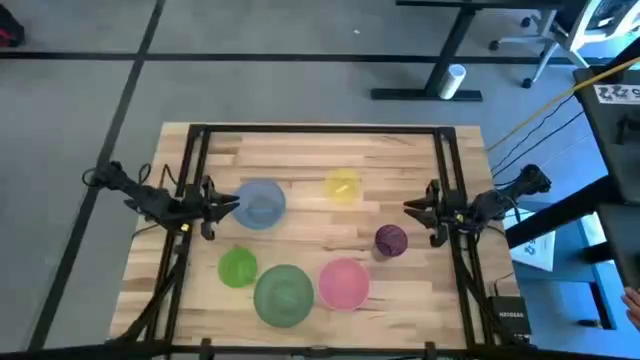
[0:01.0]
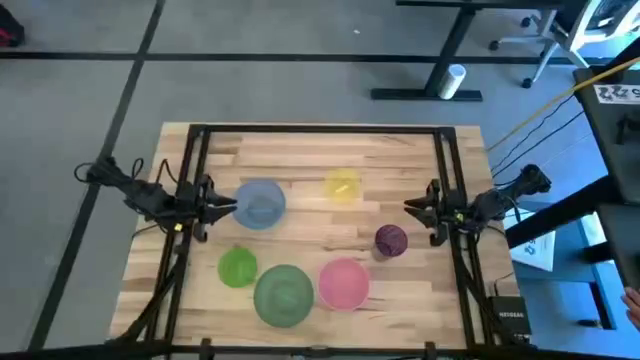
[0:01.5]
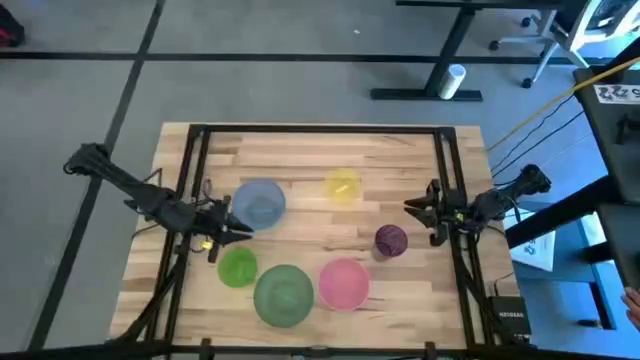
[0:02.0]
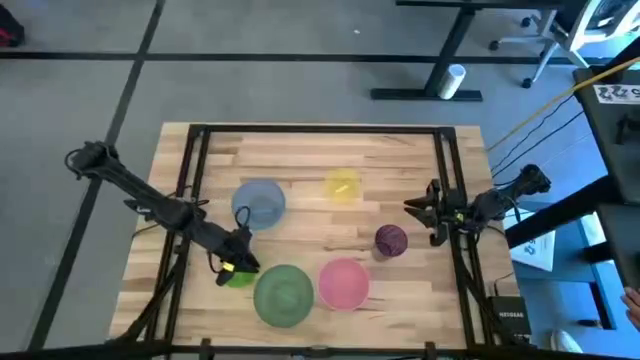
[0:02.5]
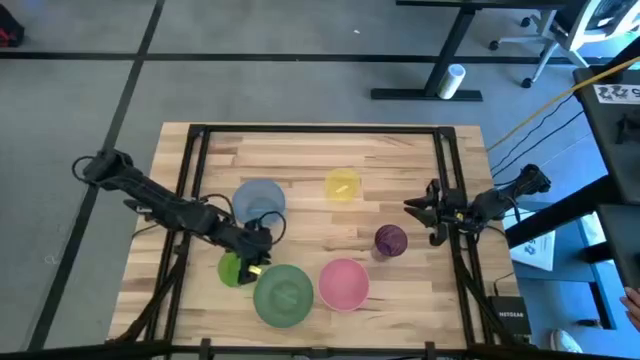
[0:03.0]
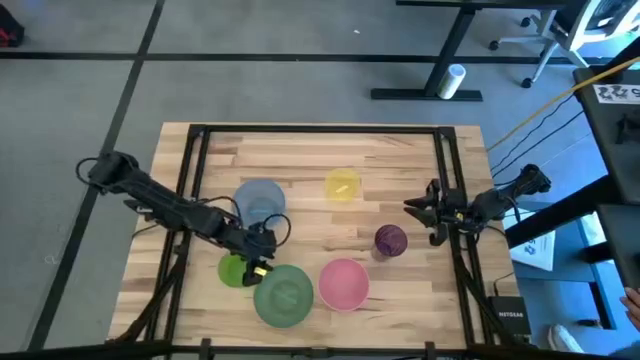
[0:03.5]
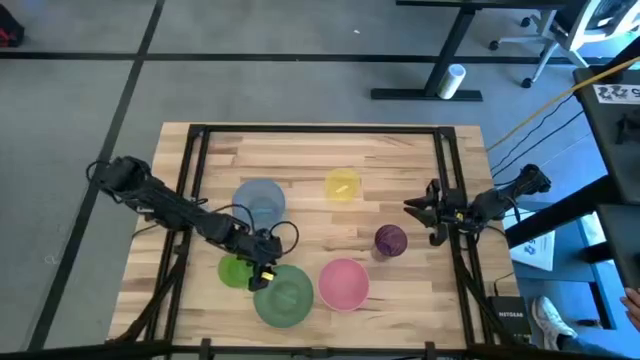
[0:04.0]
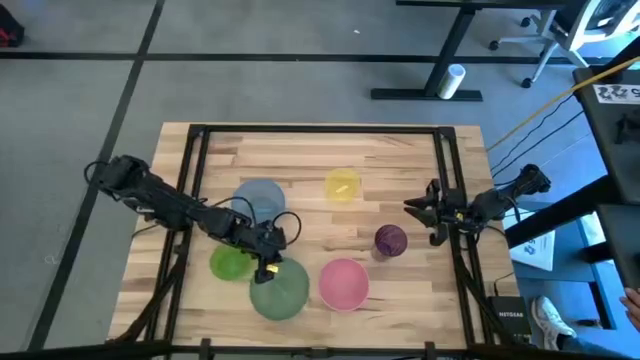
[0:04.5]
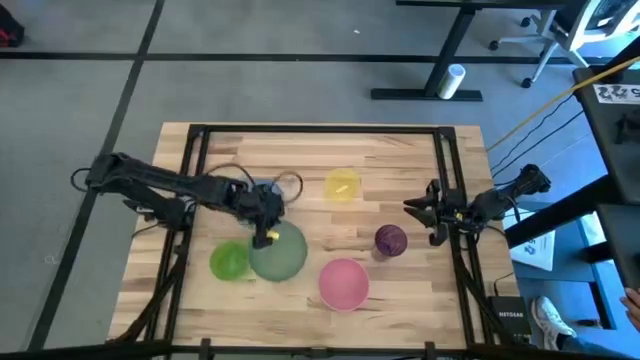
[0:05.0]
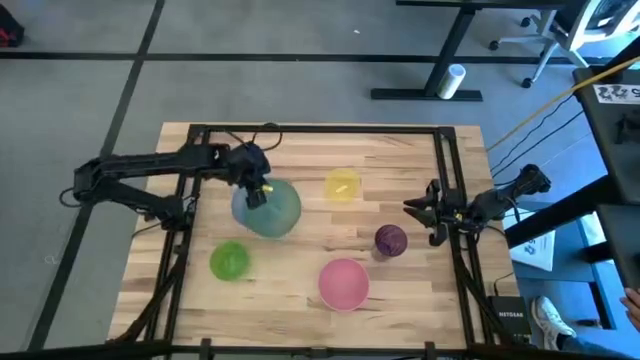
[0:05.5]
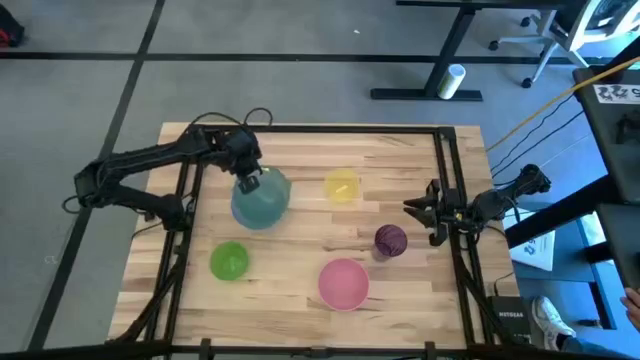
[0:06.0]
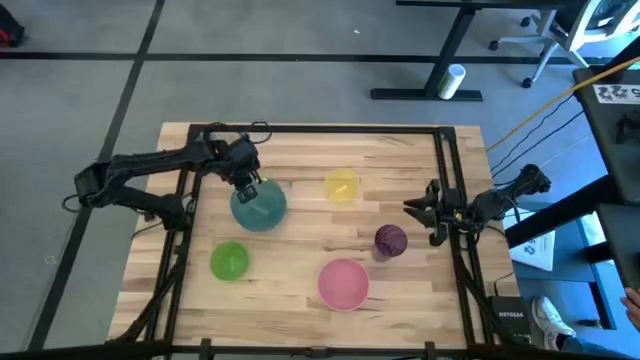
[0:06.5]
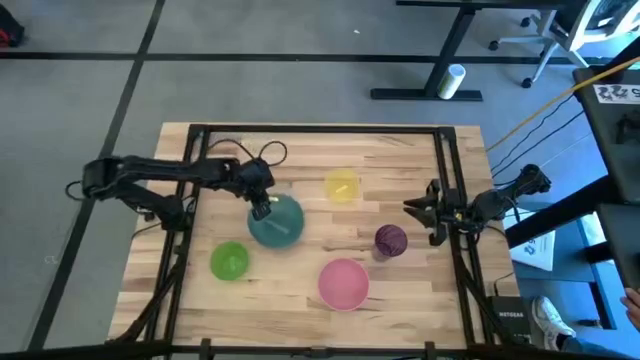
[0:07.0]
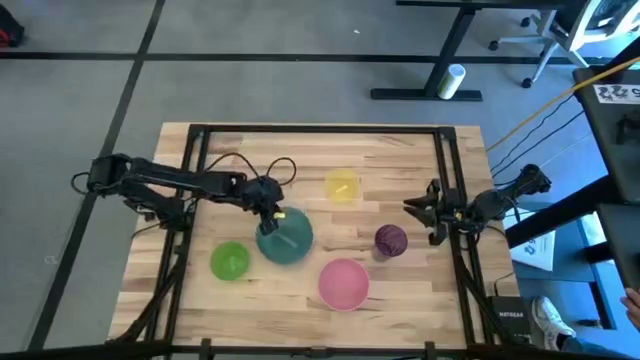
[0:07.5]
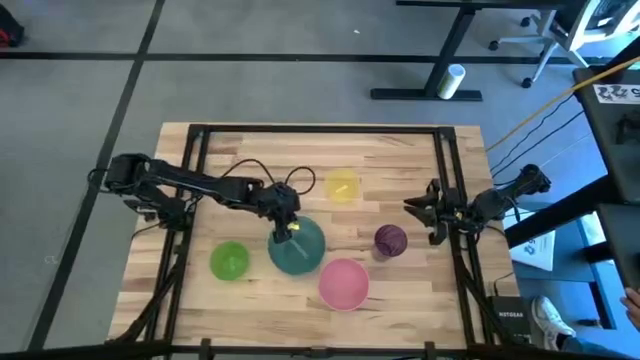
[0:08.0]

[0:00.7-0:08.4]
Stack the dark green bowl on top of the blue bowl

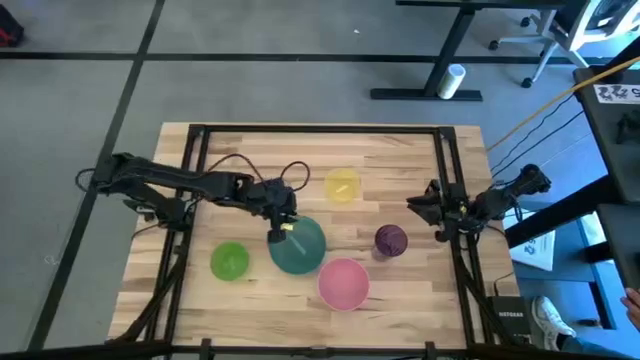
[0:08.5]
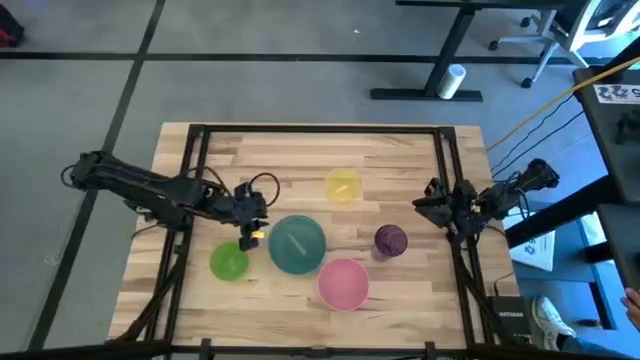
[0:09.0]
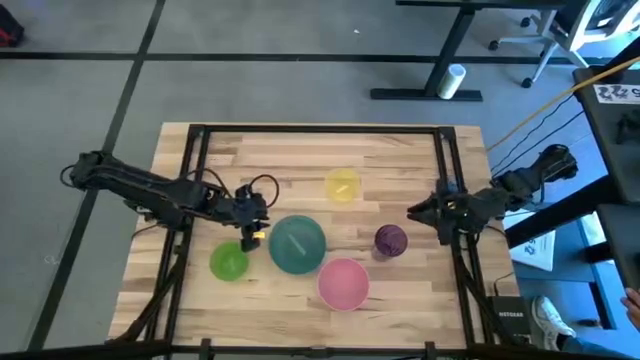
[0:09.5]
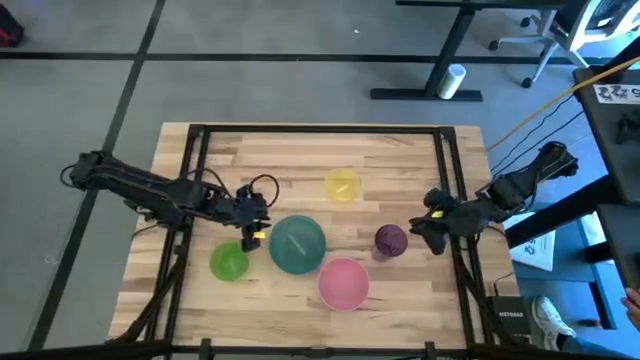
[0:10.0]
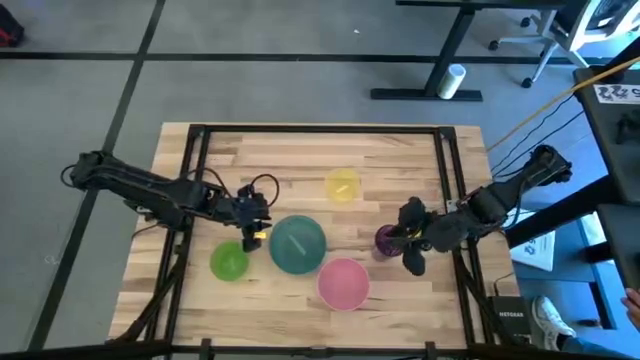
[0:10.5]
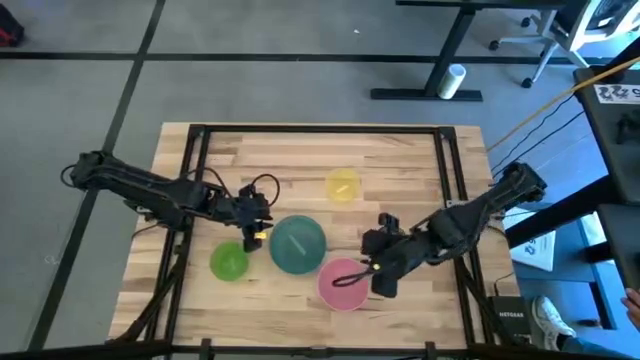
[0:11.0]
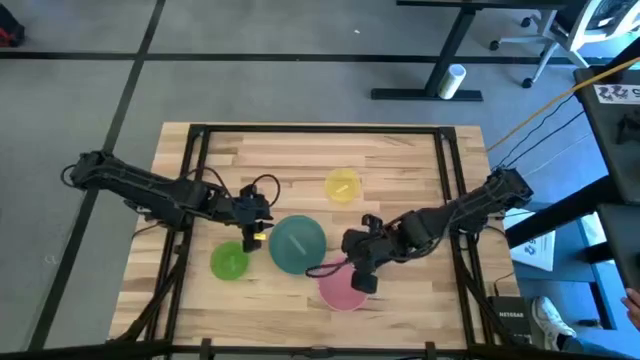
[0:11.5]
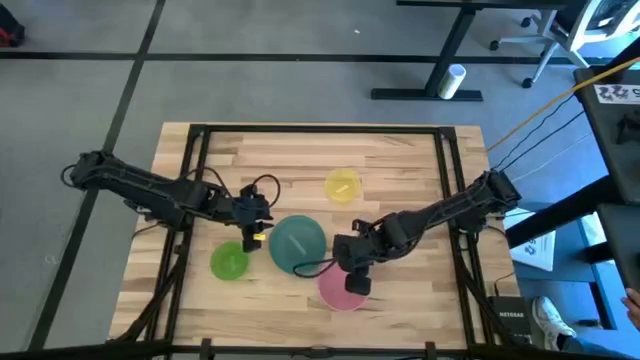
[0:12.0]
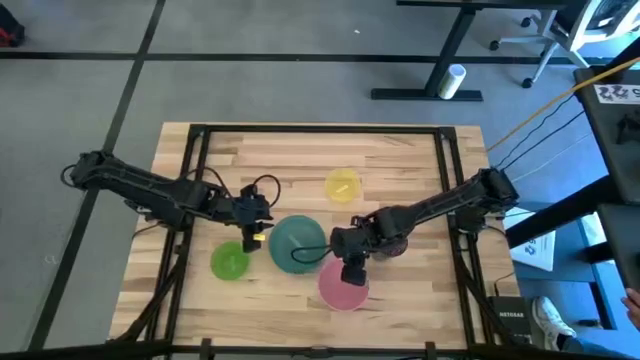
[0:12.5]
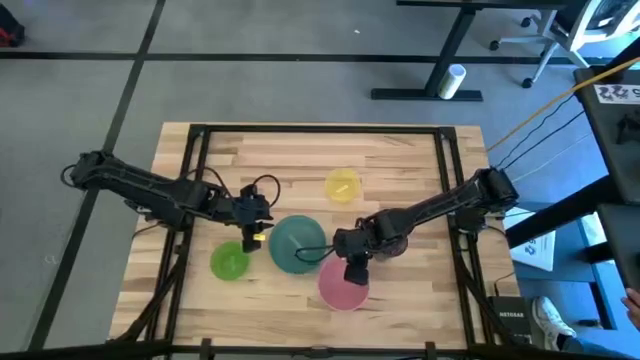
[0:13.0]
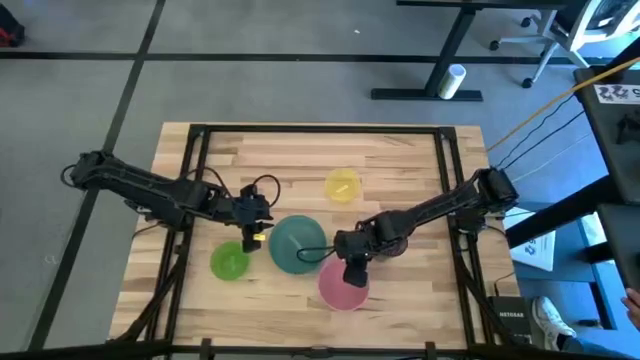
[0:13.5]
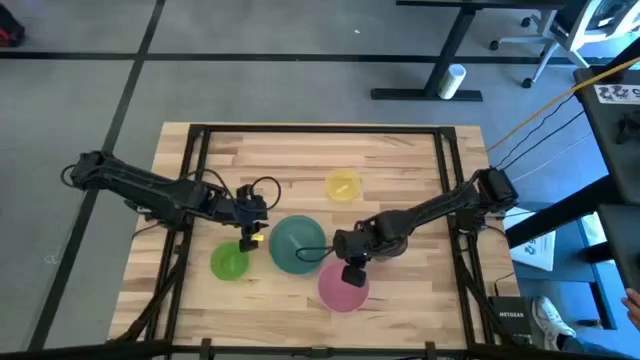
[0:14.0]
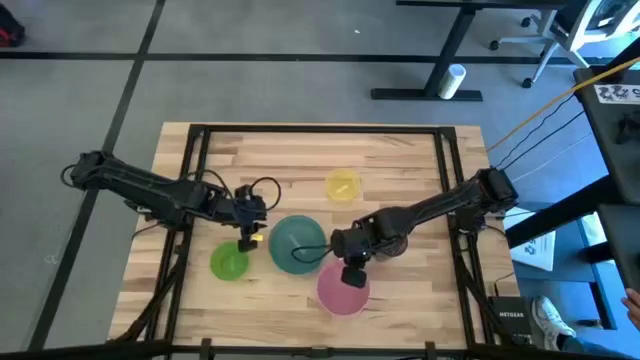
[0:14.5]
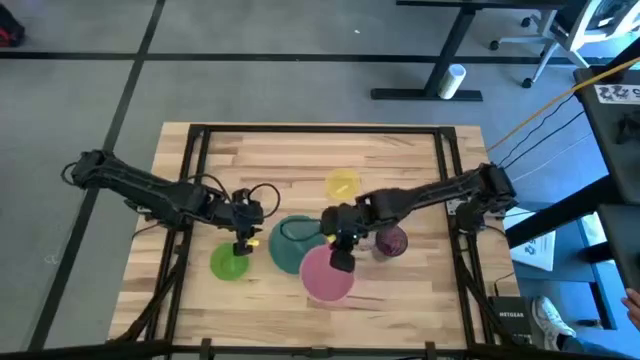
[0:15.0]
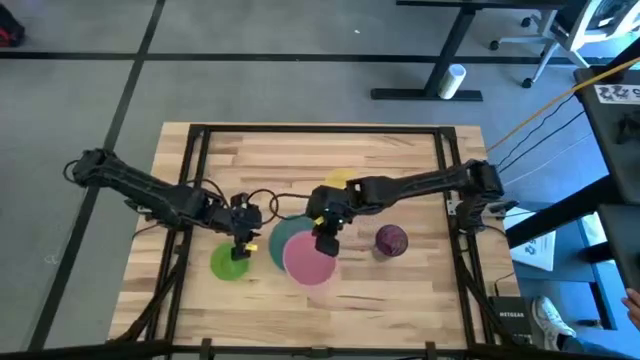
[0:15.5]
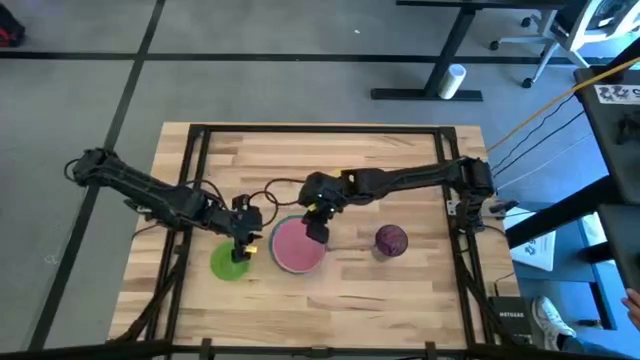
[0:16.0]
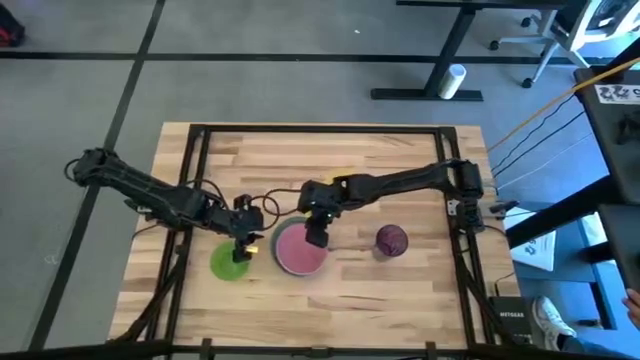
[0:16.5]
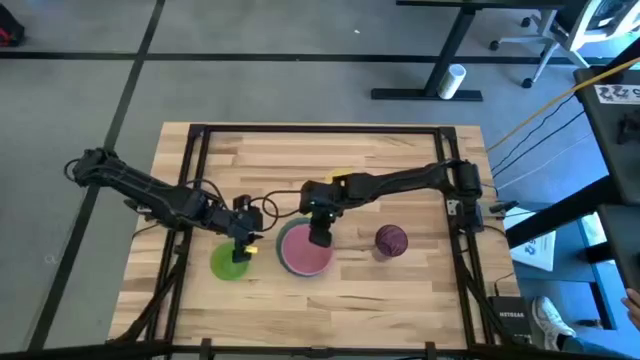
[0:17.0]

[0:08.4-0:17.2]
Stack the pink bowl on top of the dark green bowl

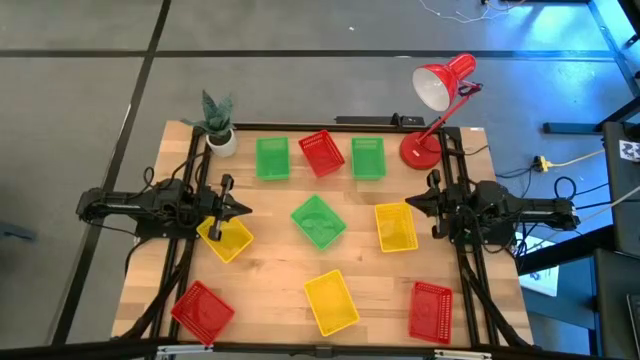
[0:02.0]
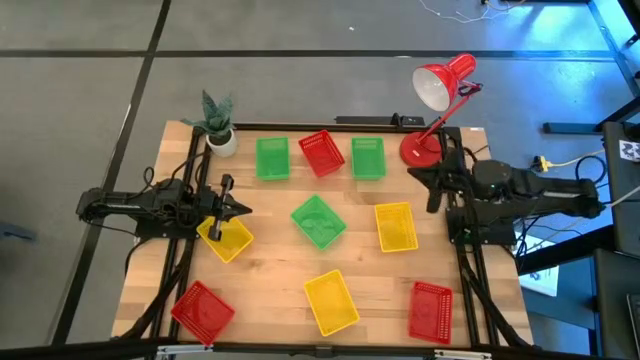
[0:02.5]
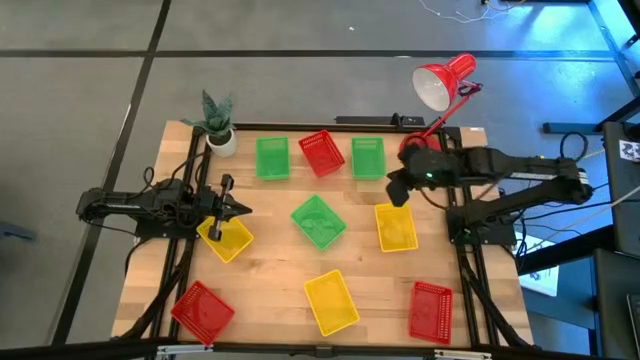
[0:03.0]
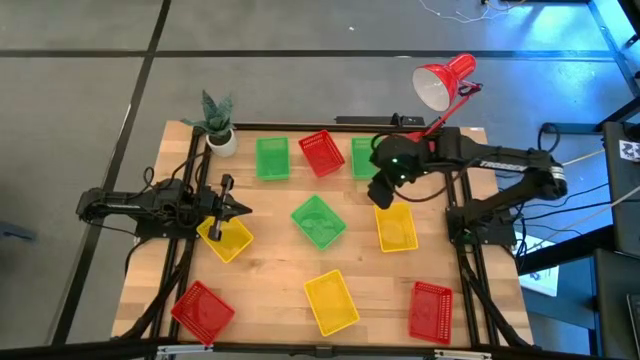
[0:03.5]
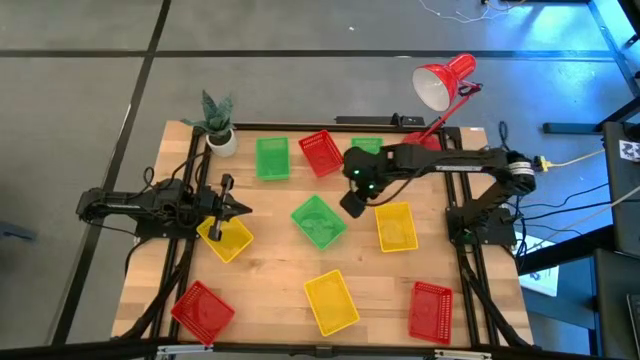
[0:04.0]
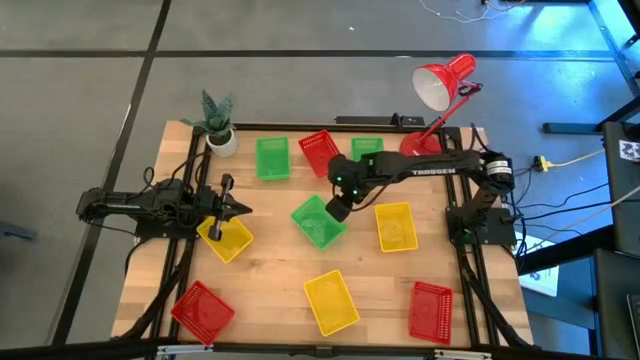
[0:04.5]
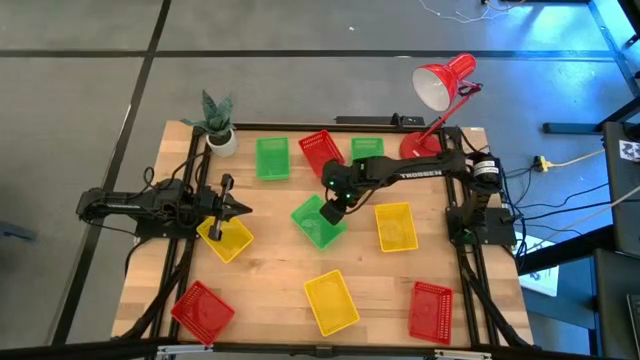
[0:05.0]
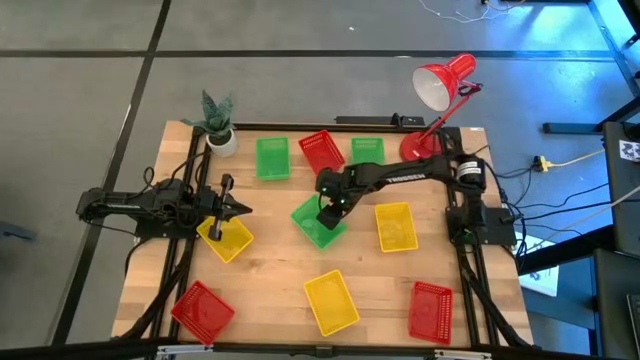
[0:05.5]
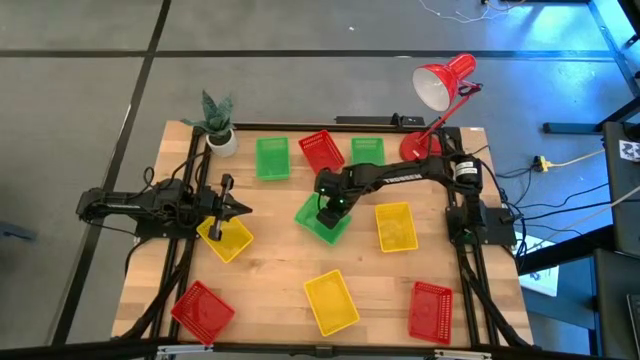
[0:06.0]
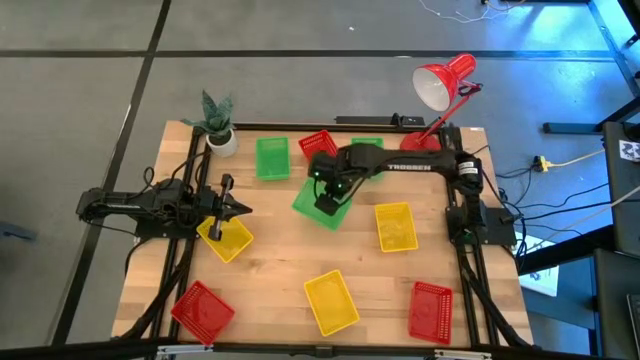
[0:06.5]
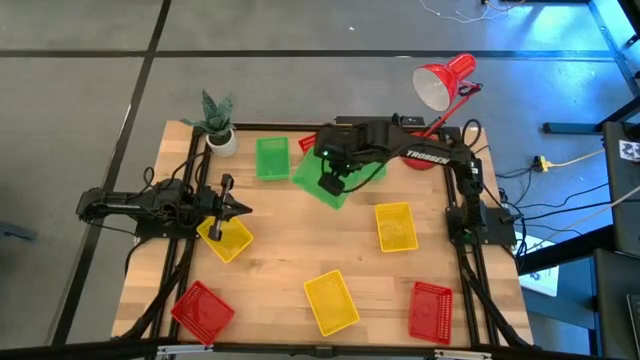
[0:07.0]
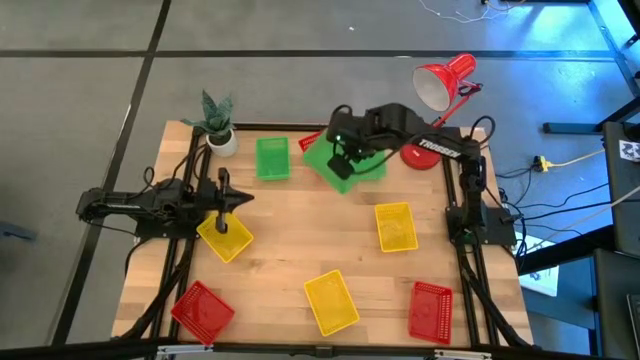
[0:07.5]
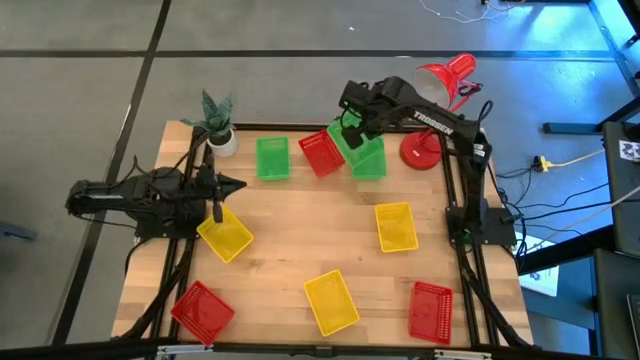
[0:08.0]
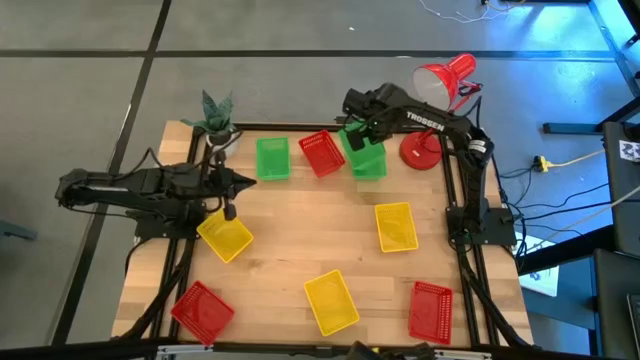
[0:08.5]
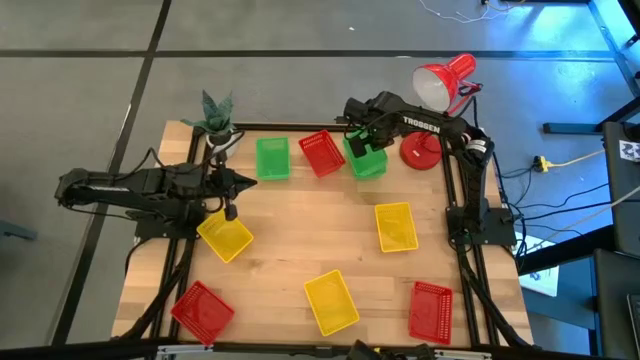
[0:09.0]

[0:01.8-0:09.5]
Stack the bottom green bin on the top right green bin
